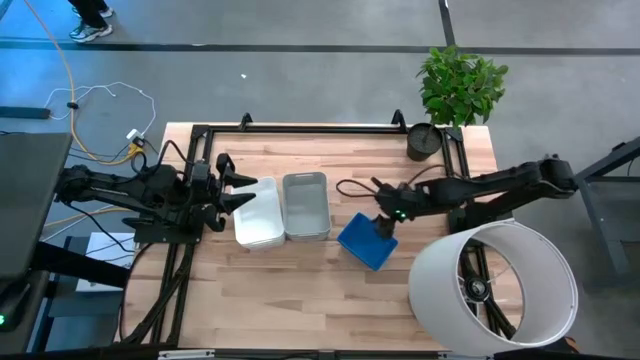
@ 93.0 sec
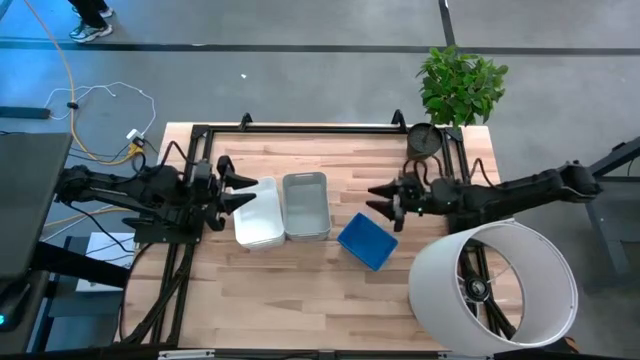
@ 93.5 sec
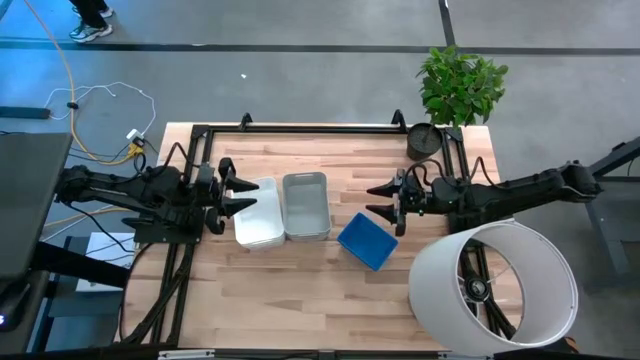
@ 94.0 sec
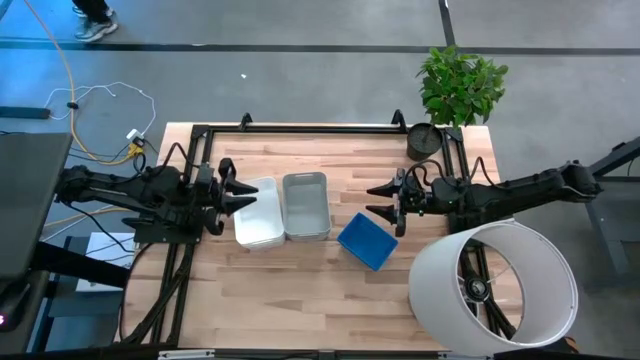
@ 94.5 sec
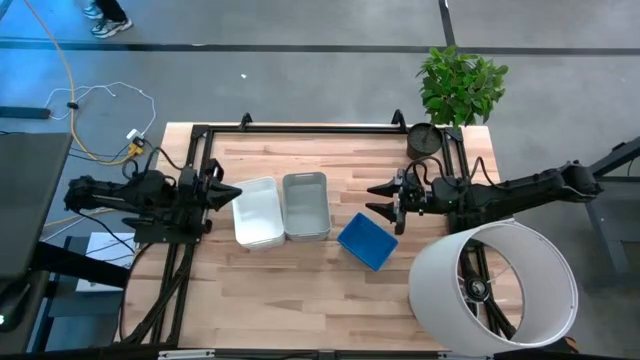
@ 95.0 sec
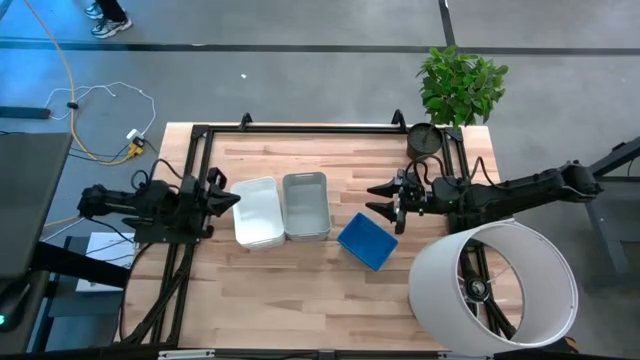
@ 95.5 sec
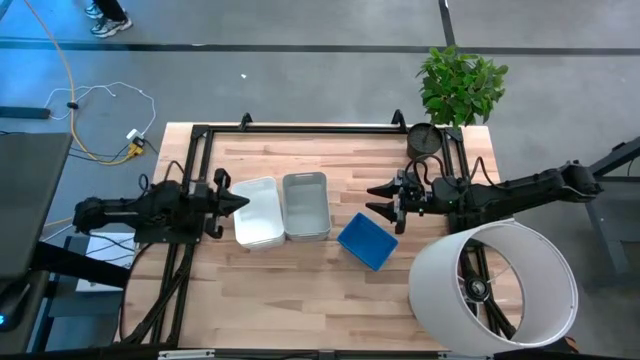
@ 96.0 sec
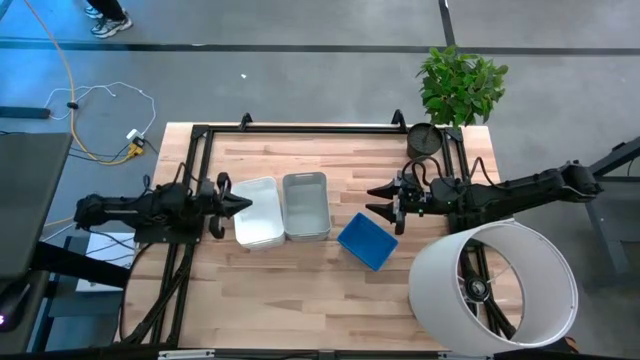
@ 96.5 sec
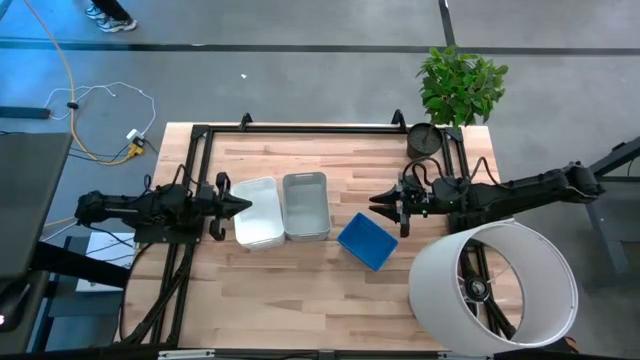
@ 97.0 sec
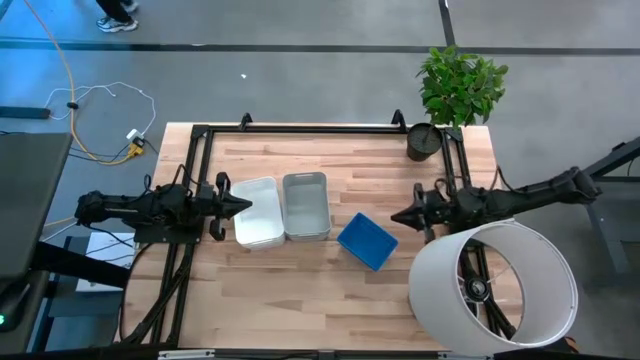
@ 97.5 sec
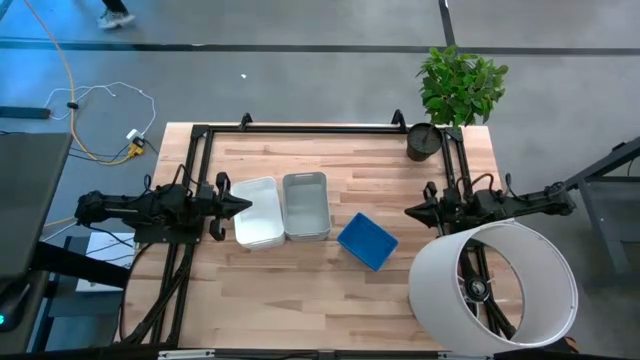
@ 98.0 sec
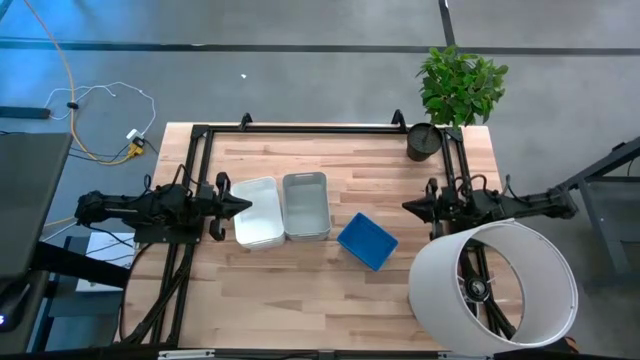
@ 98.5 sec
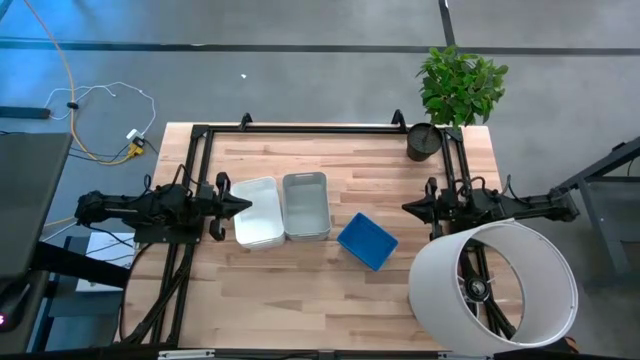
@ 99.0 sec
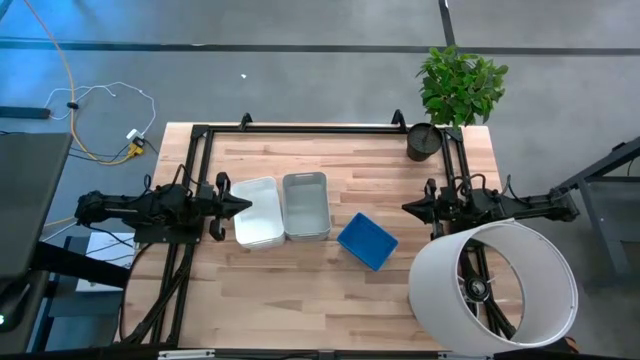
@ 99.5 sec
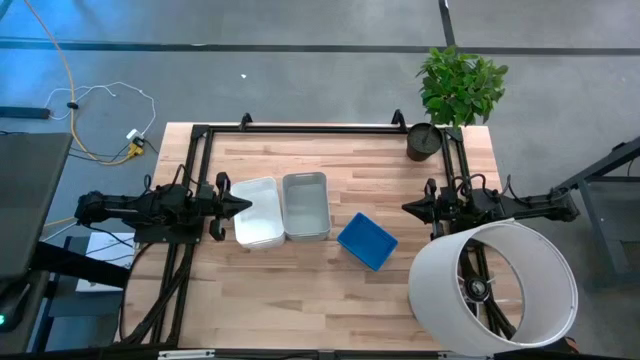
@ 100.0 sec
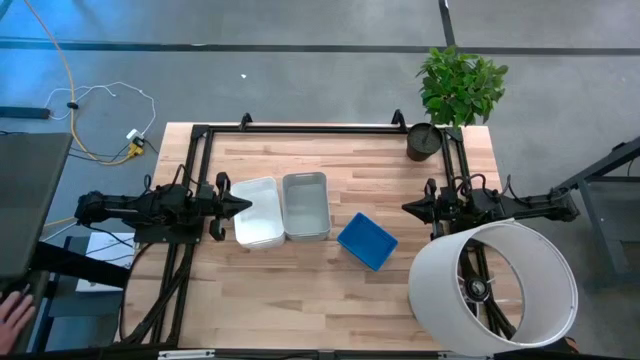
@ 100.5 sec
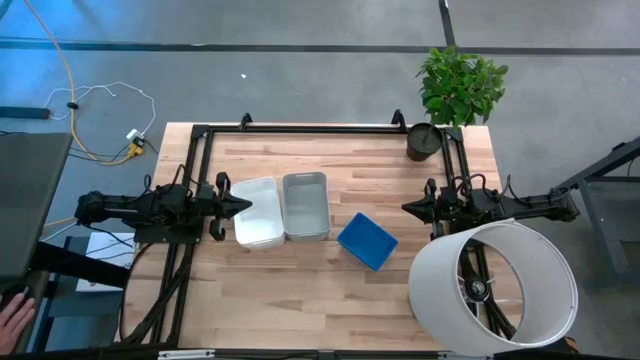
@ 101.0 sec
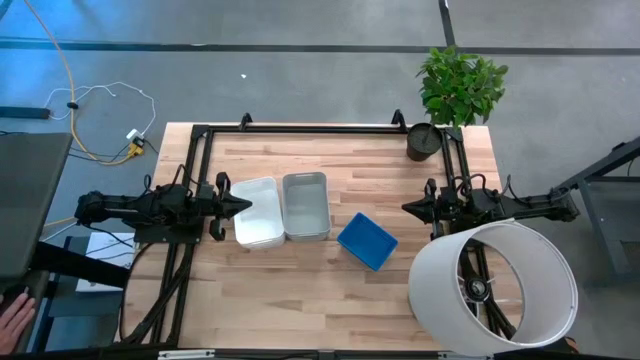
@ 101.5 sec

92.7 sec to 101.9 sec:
Return to Home Position
